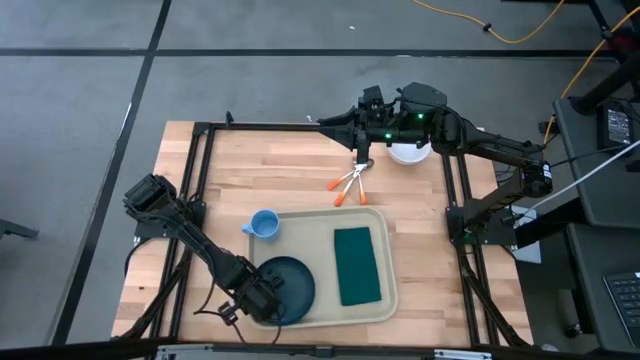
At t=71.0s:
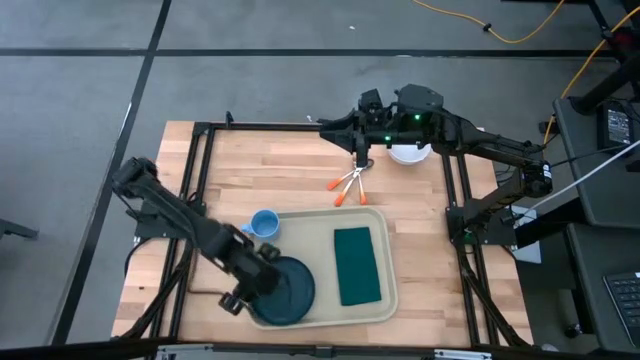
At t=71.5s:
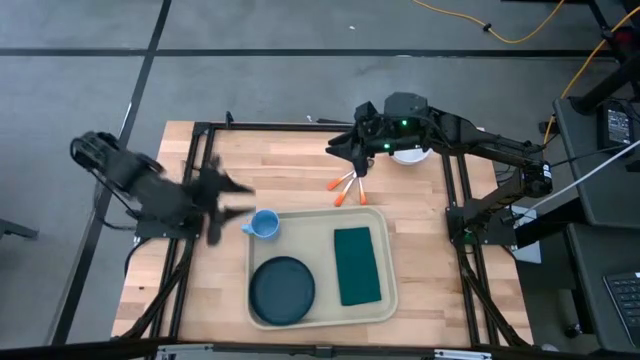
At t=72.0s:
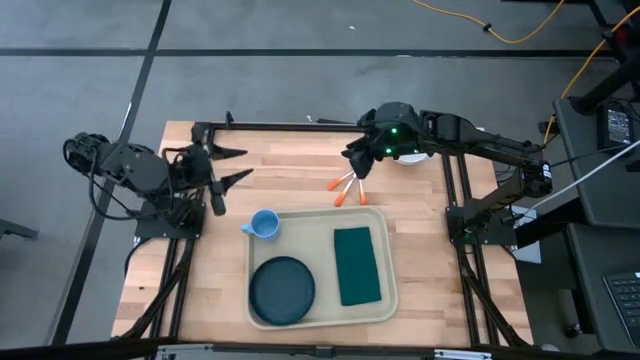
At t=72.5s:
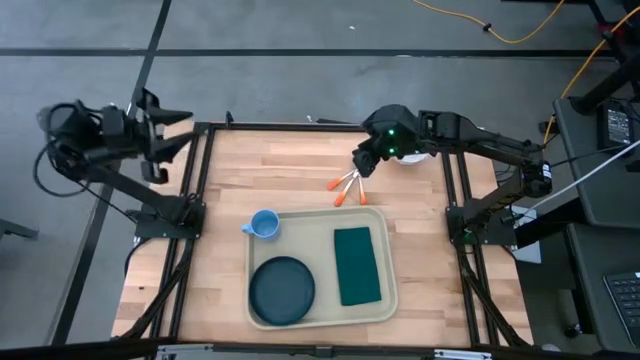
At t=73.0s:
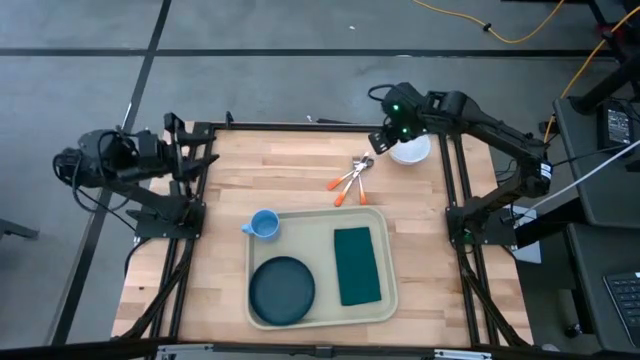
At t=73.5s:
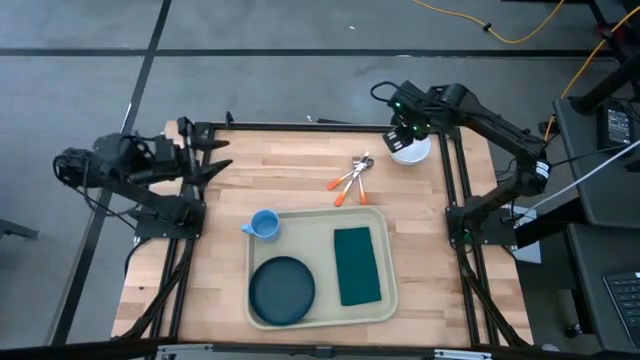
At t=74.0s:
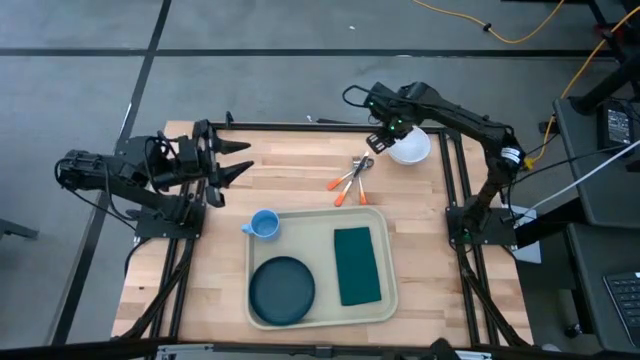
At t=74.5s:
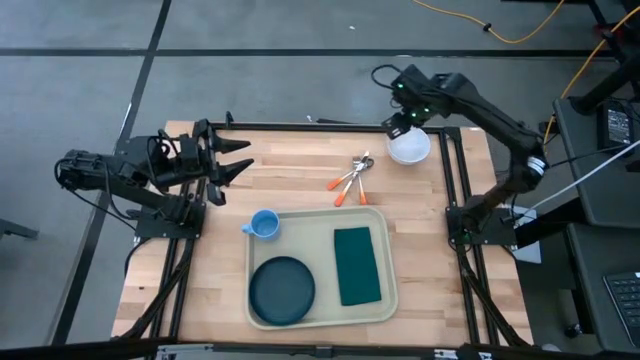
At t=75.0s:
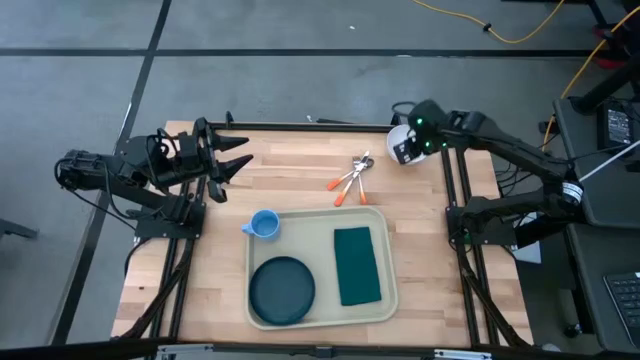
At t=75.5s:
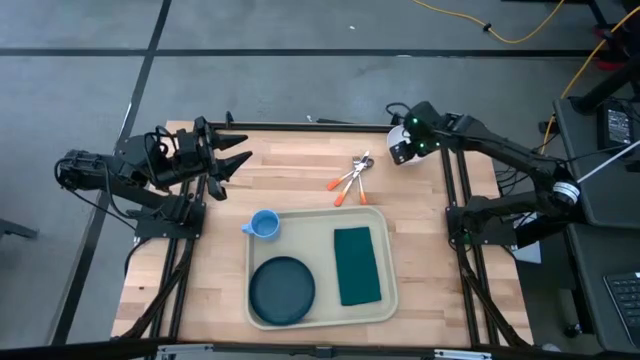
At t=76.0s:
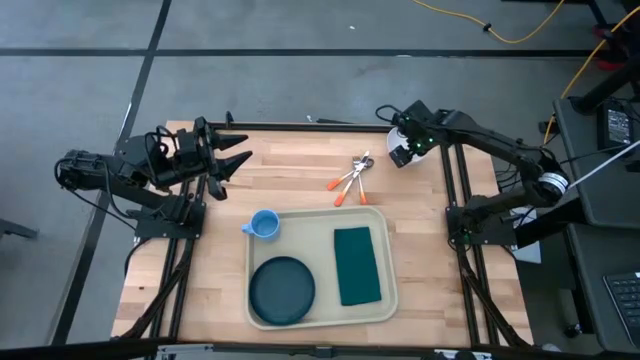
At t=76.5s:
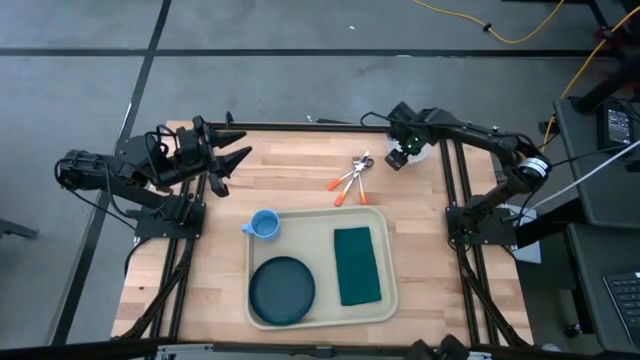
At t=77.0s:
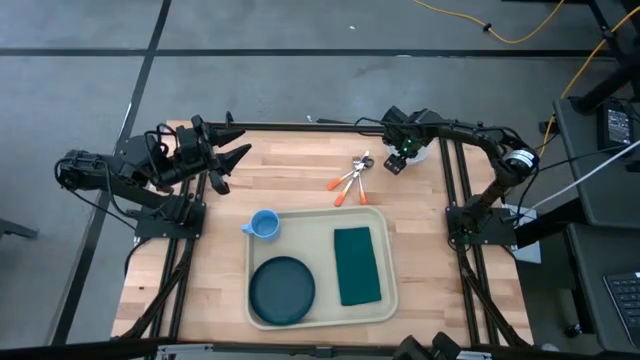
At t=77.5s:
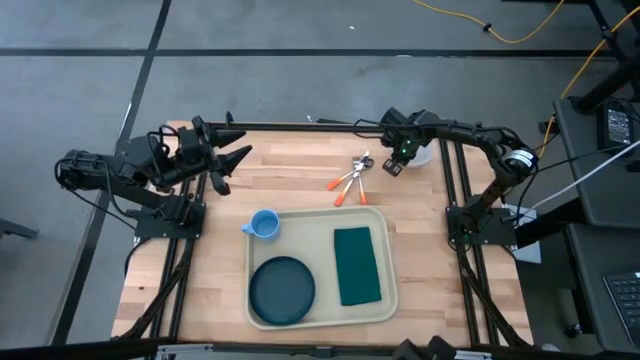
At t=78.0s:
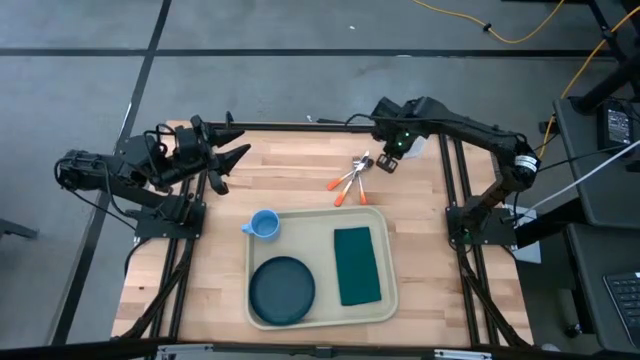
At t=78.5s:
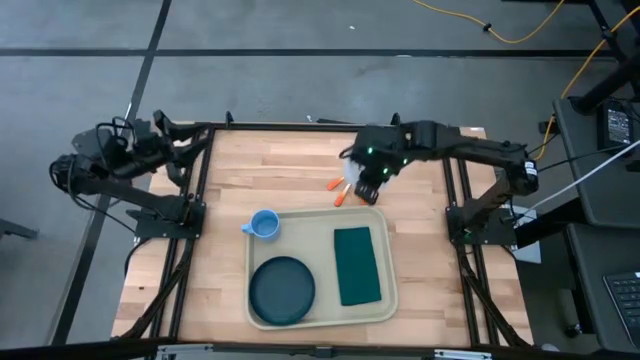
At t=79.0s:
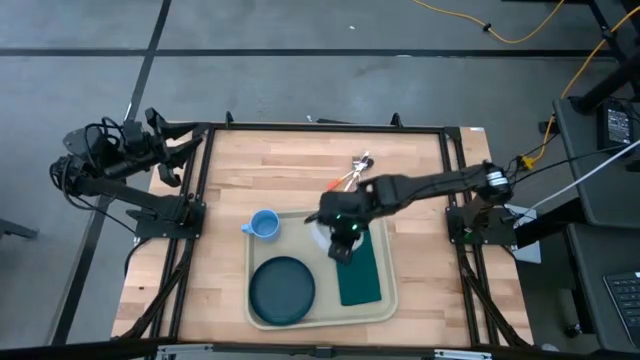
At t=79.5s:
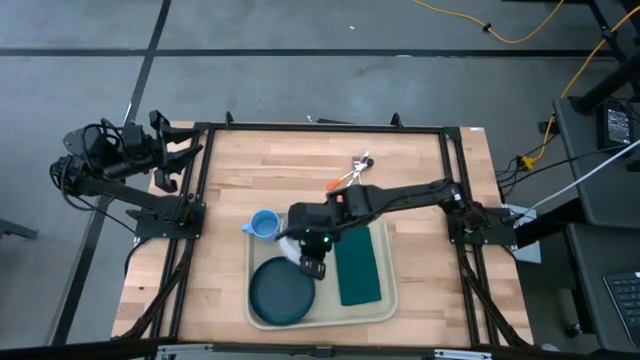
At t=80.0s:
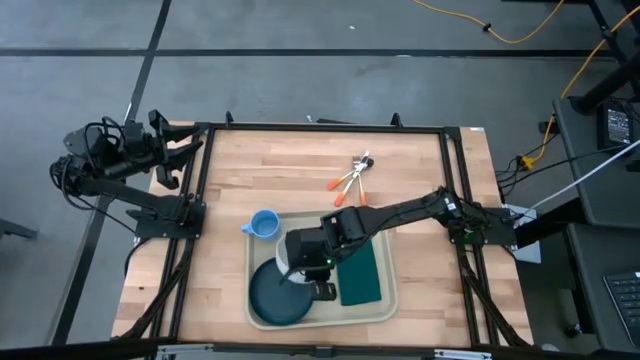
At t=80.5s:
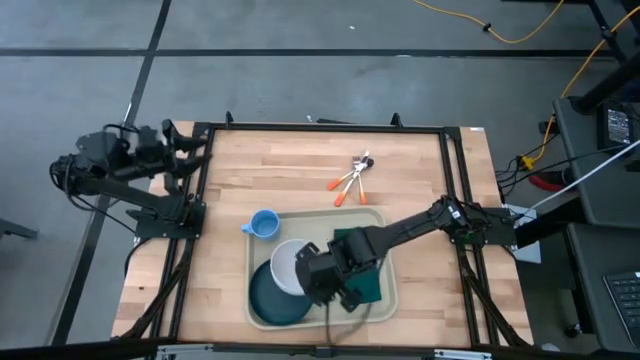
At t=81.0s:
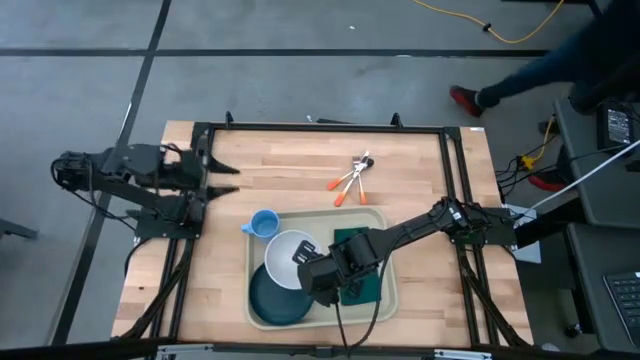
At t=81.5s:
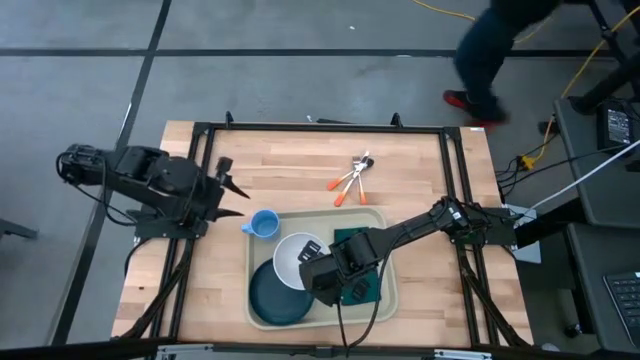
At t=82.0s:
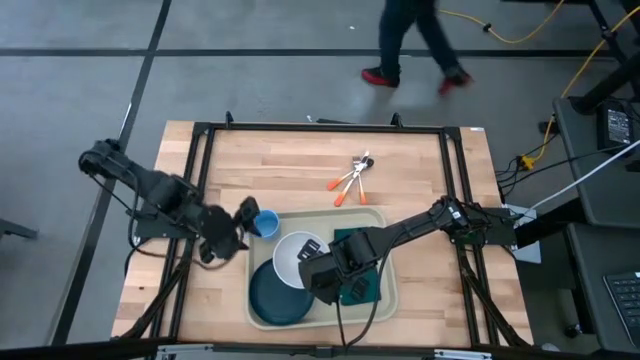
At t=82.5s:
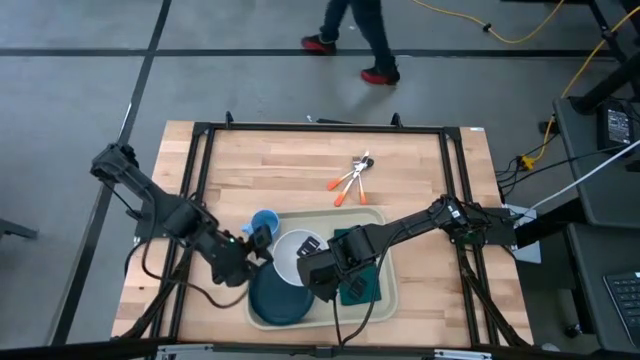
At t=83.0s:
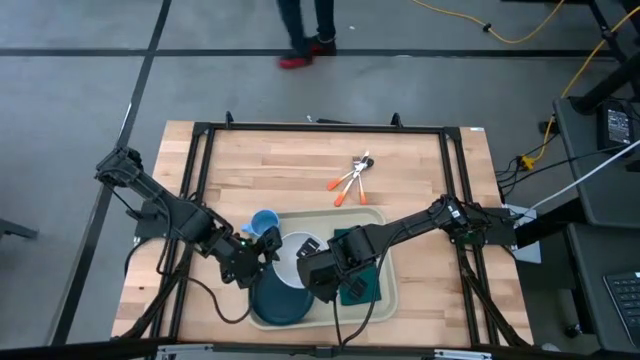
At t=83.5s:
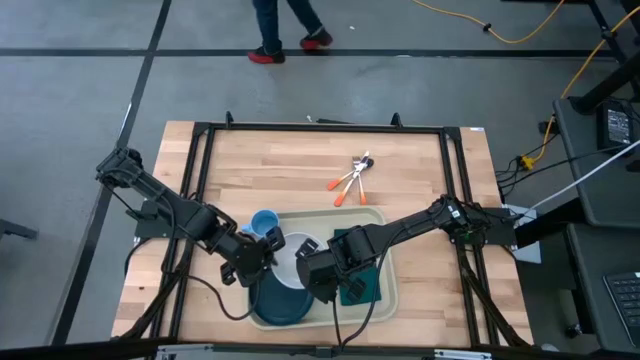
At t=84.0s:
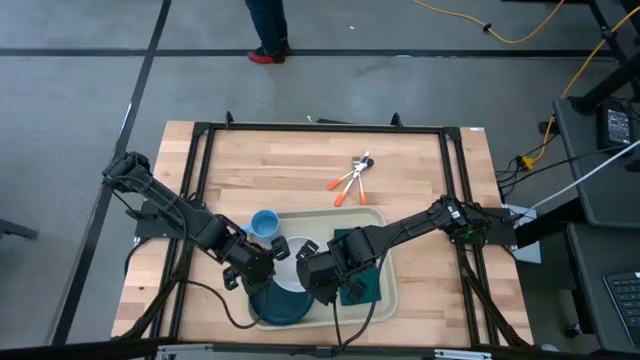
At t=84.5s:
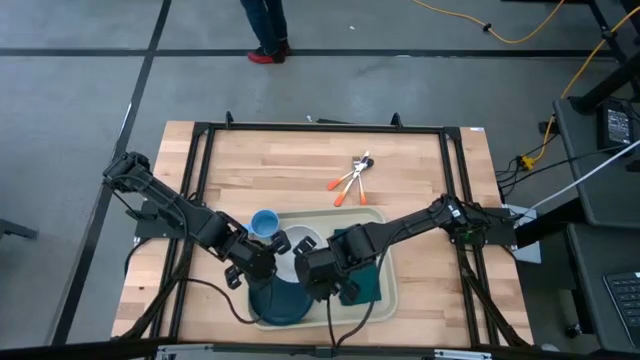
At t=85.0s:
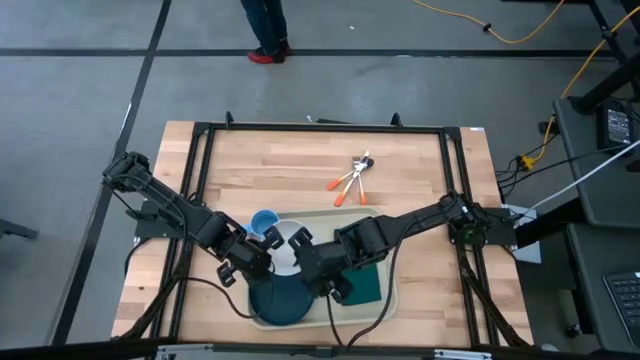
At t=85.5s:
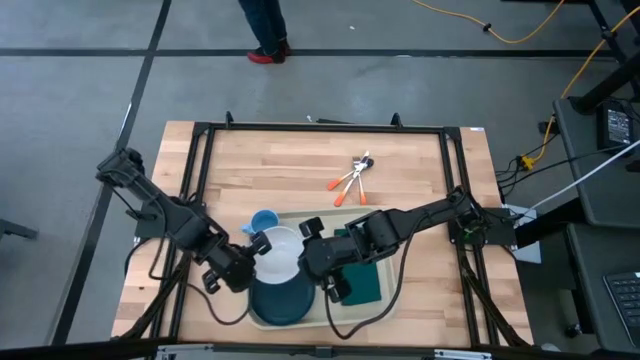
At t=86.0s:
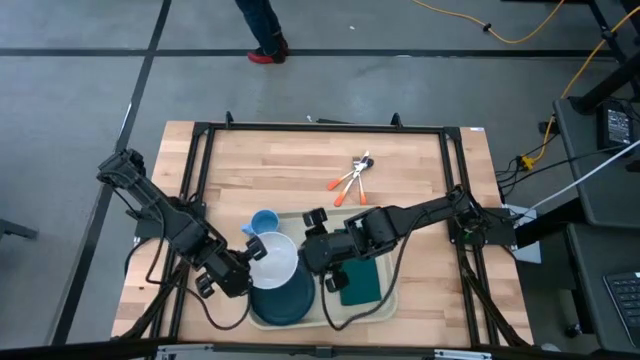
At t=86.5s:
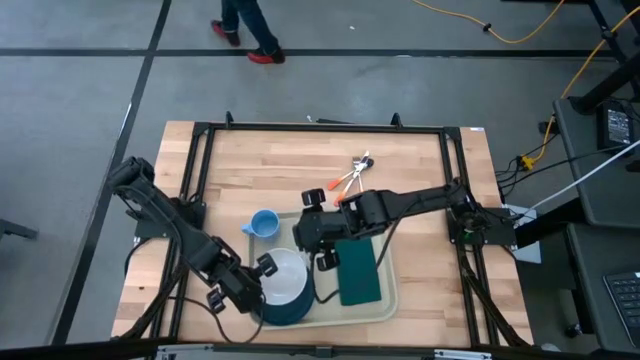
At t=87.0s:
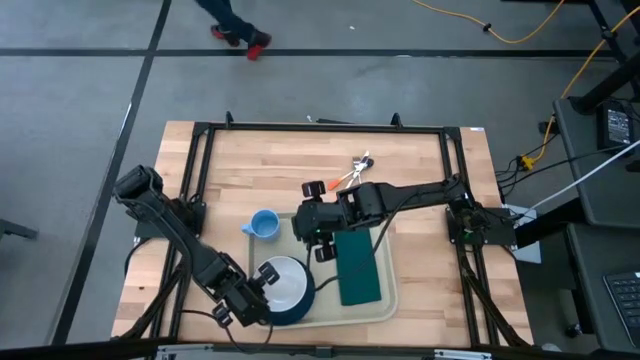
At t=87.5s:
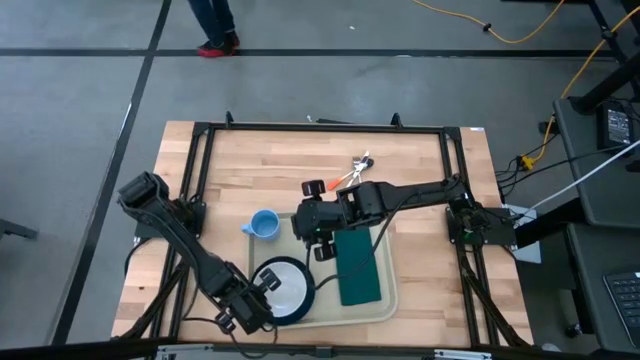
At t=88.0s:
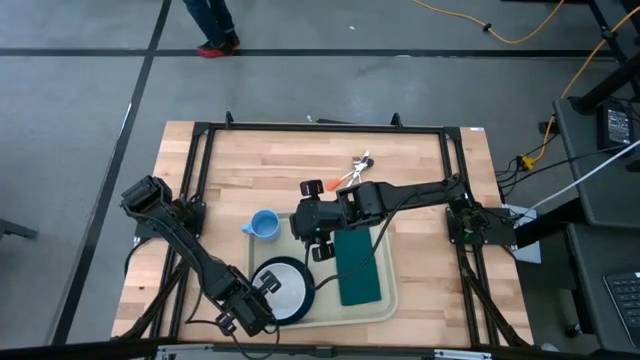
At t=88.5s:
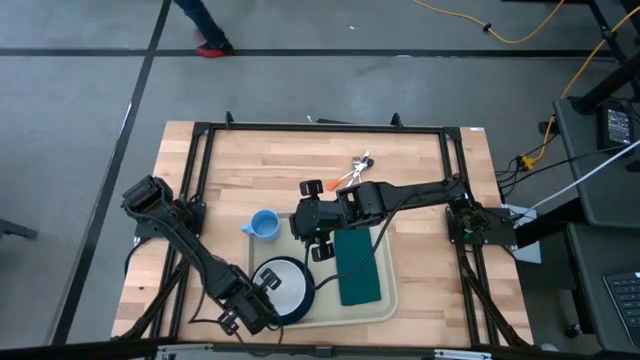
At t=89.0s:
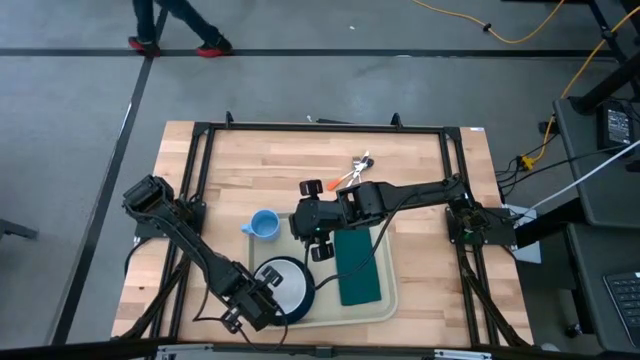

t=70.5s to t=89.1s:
Task: Set up tray
Put the white bowl on top of the green plate on the light brown serving tray

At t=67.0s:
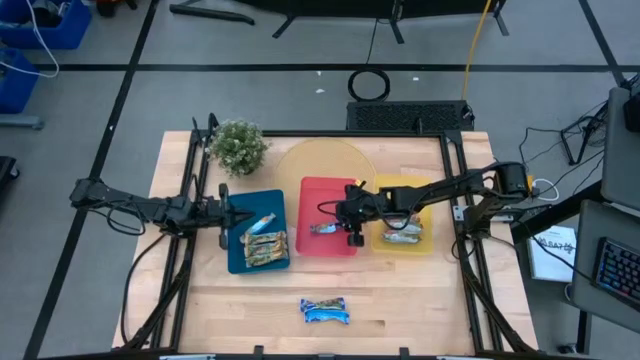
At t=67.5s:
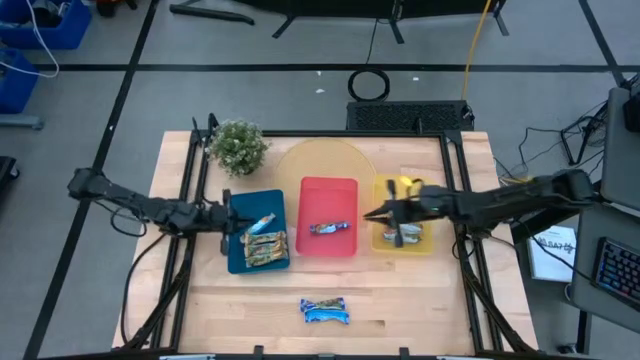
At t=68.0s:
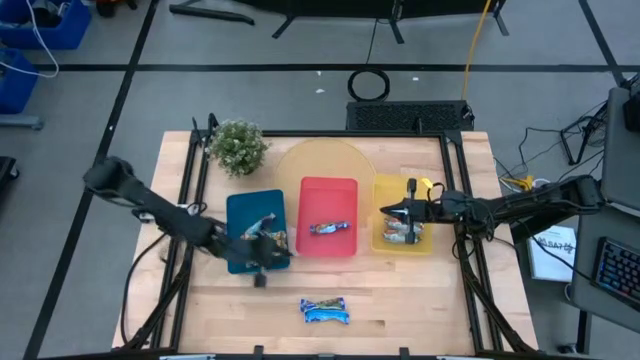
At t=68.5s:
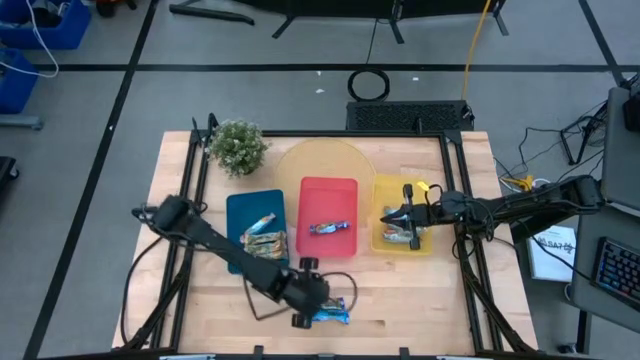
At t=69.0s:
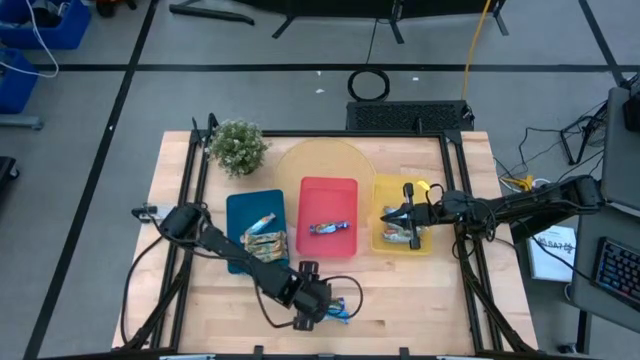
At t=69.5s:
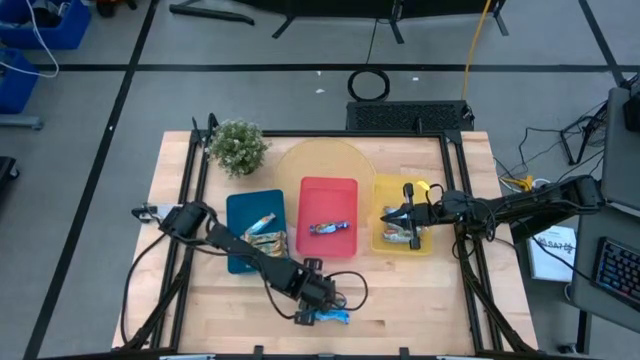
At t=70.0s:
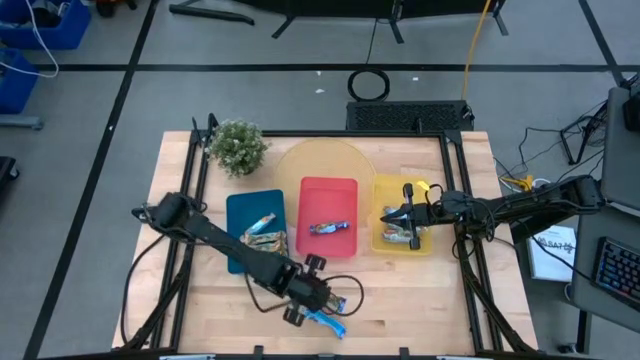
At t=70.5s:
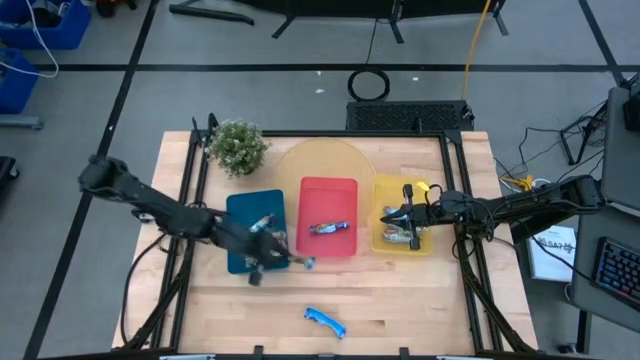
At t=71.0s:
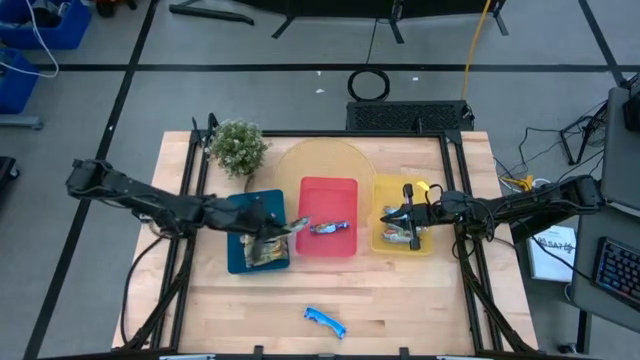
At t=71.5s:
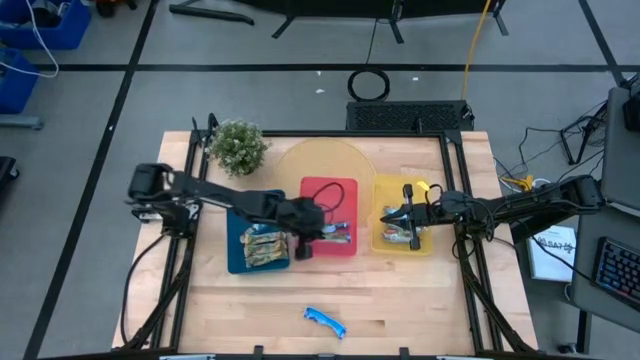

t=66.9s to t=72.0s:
Task: Pick and place Granola Bars by type
Put the blue granola bar into the red bin
